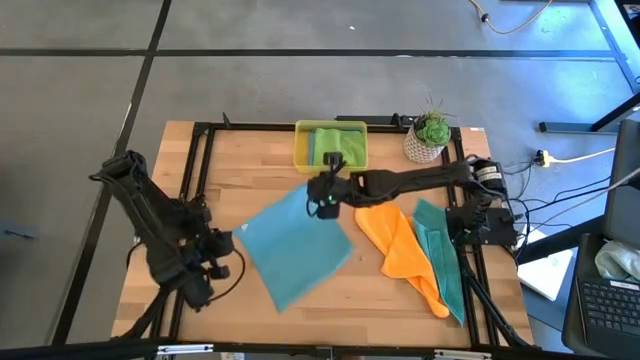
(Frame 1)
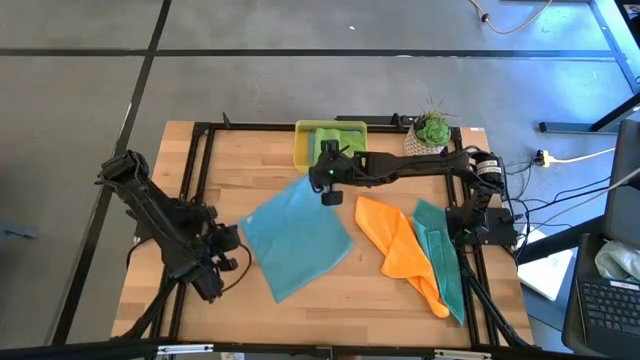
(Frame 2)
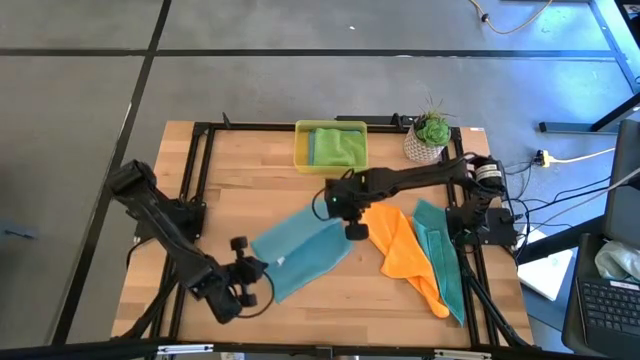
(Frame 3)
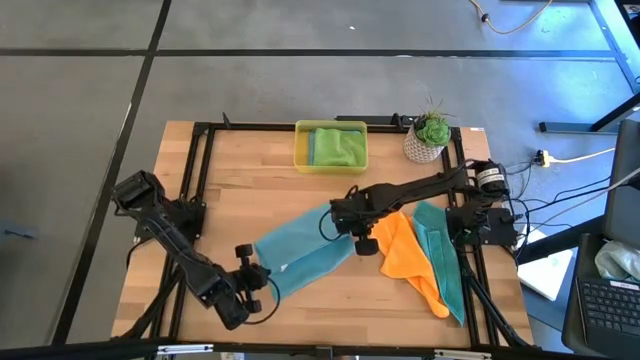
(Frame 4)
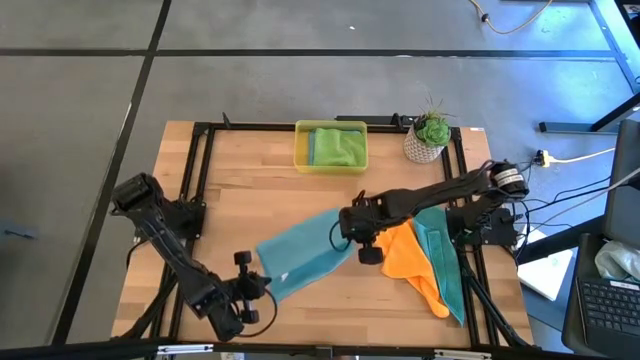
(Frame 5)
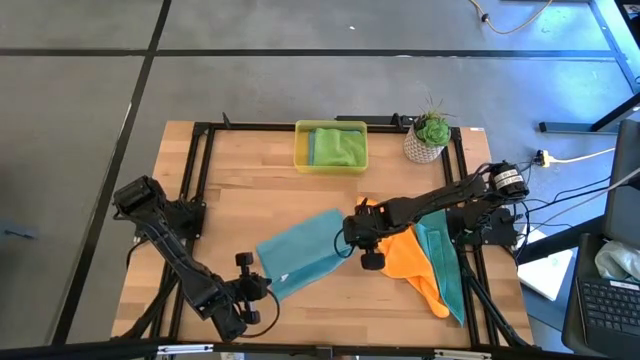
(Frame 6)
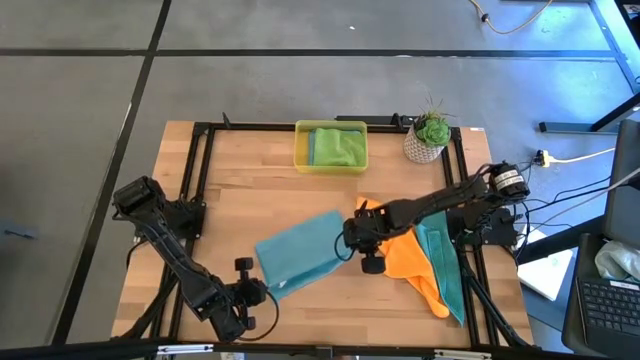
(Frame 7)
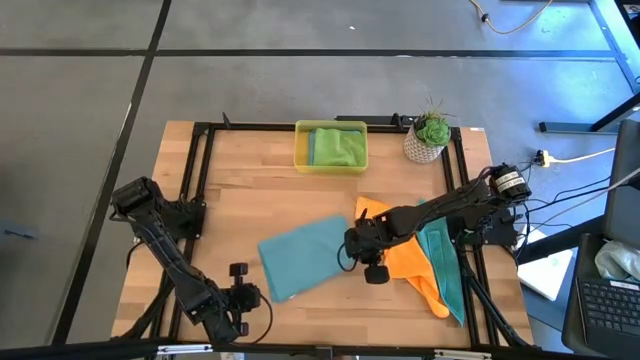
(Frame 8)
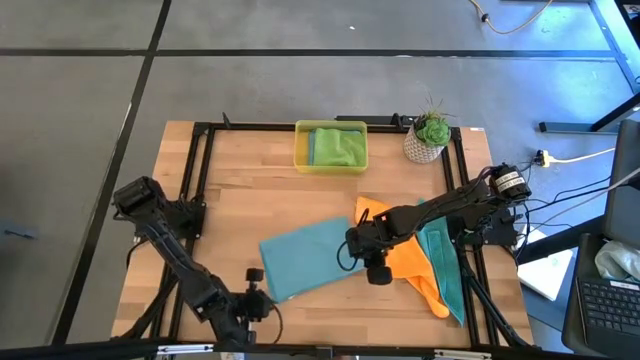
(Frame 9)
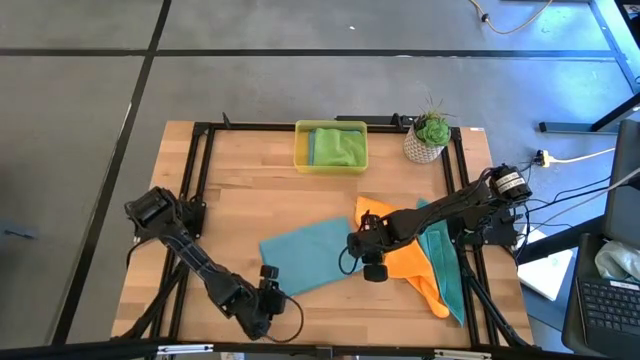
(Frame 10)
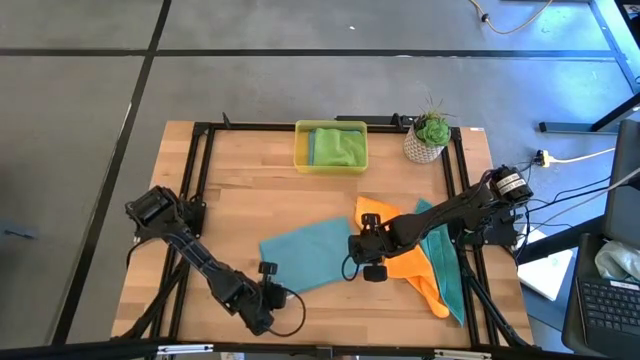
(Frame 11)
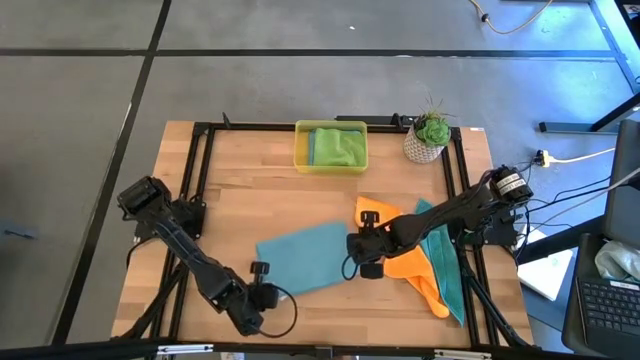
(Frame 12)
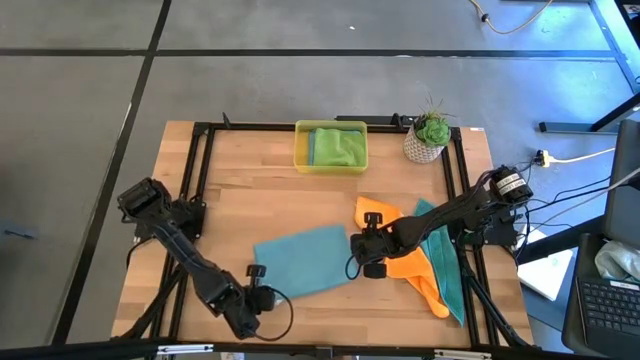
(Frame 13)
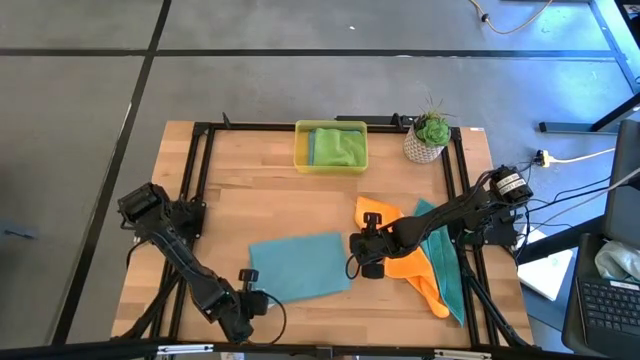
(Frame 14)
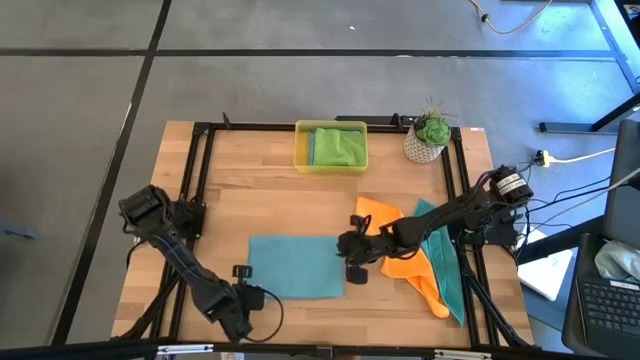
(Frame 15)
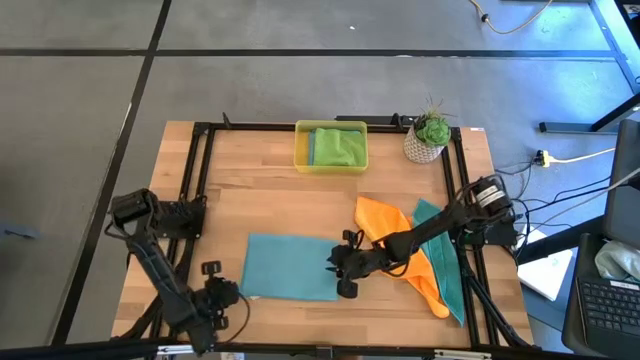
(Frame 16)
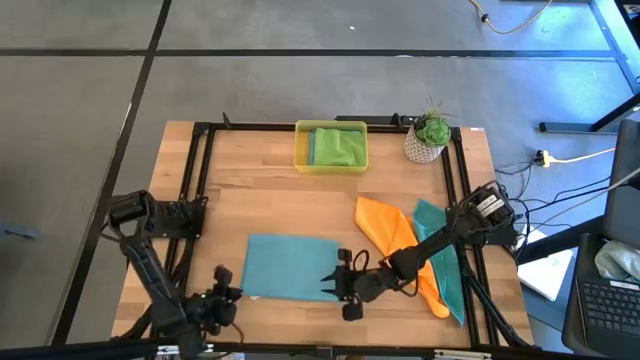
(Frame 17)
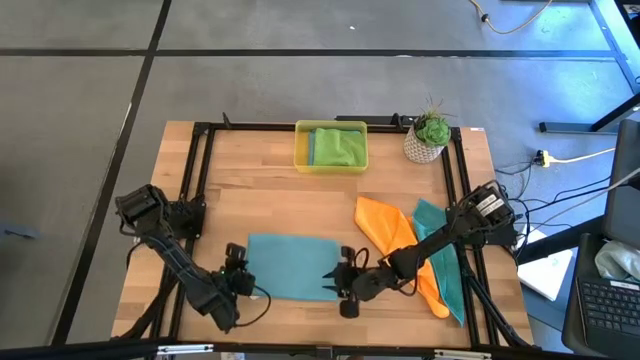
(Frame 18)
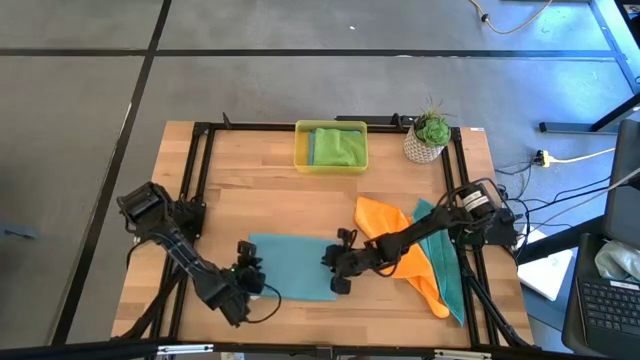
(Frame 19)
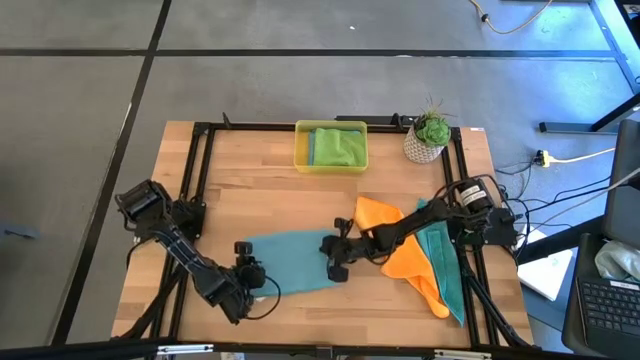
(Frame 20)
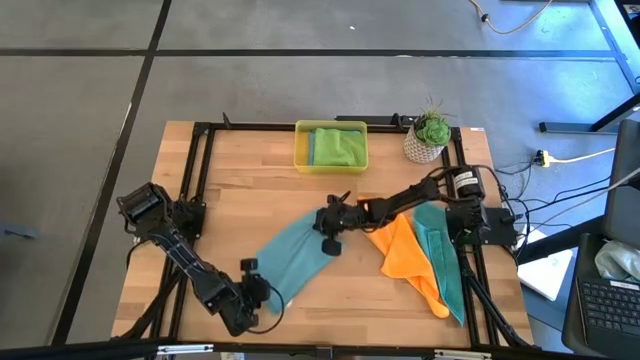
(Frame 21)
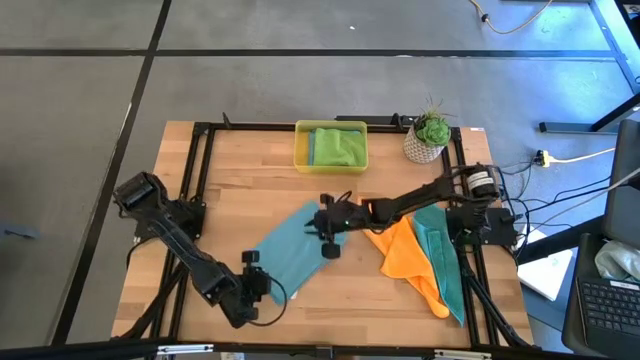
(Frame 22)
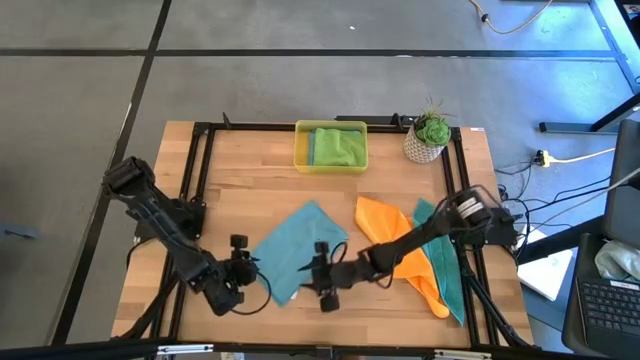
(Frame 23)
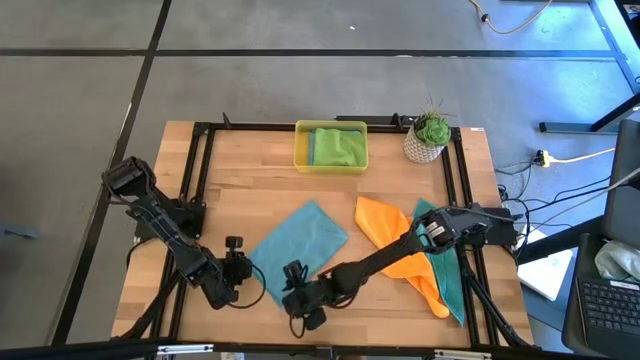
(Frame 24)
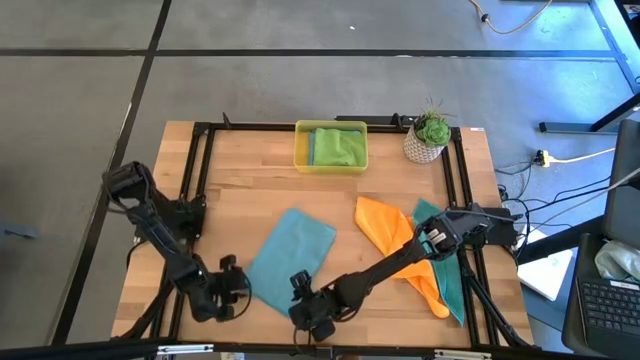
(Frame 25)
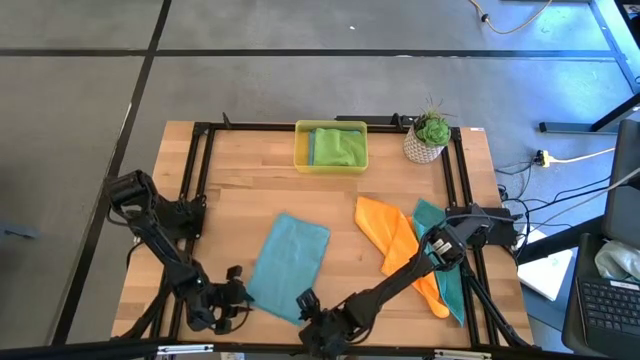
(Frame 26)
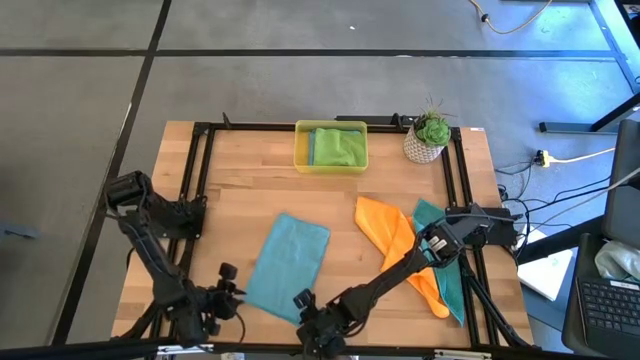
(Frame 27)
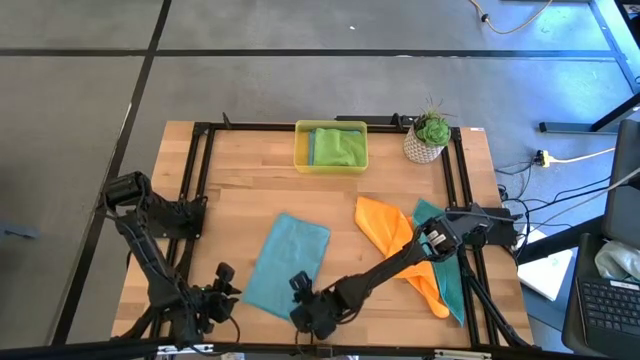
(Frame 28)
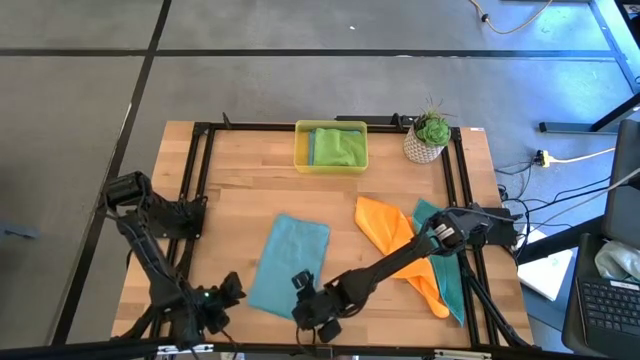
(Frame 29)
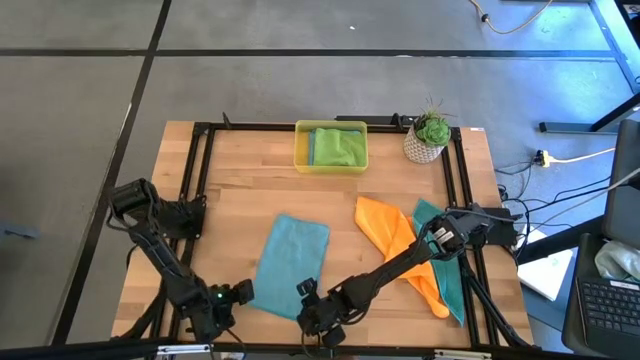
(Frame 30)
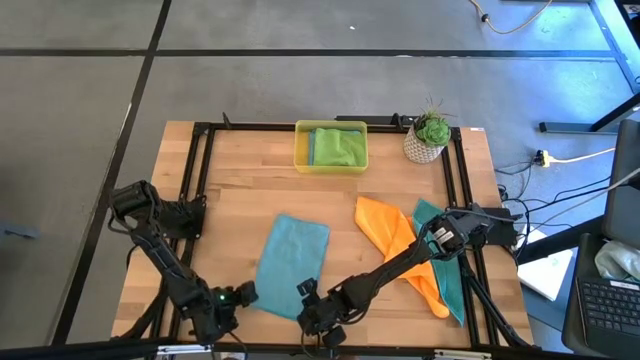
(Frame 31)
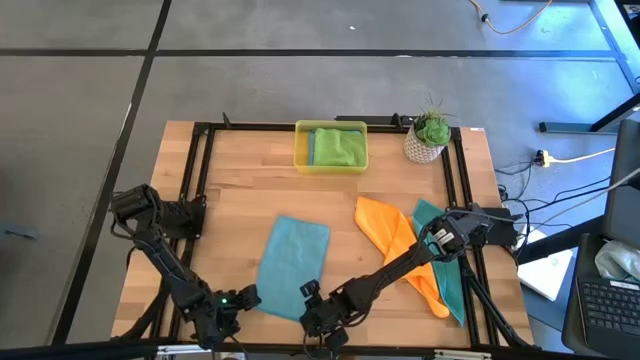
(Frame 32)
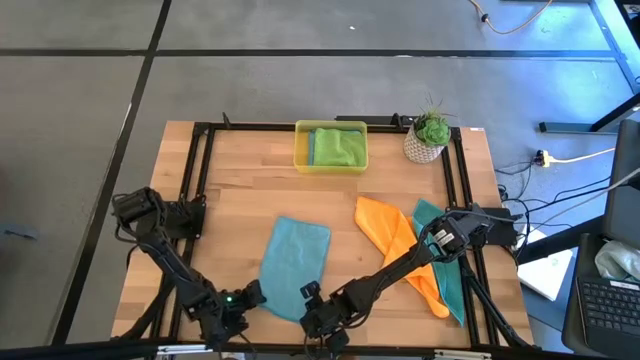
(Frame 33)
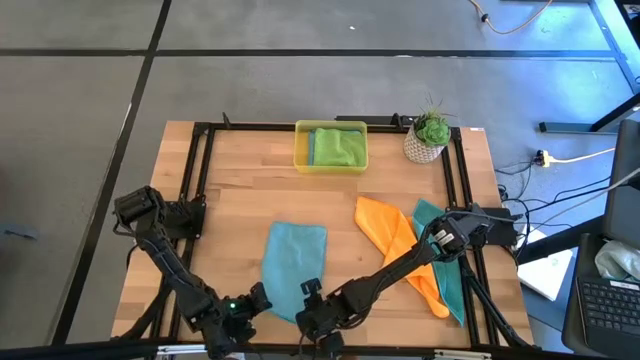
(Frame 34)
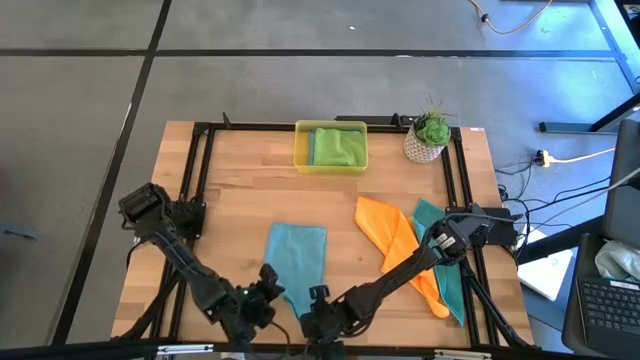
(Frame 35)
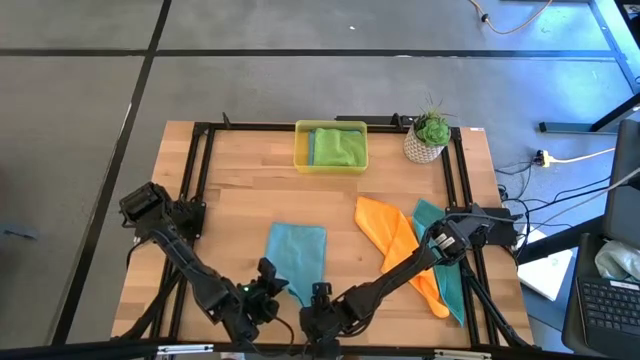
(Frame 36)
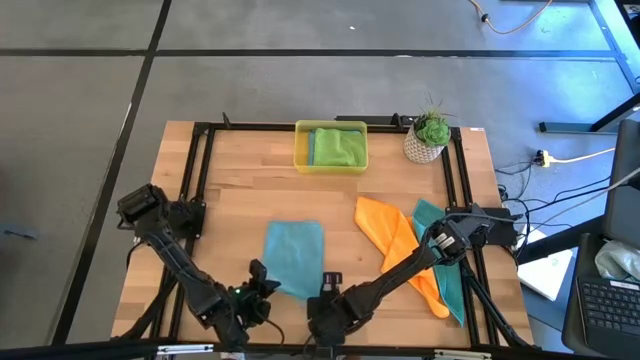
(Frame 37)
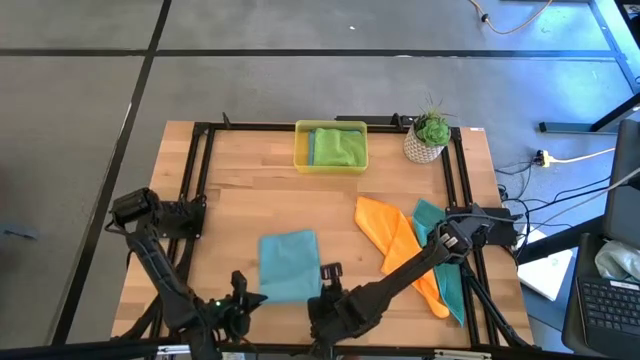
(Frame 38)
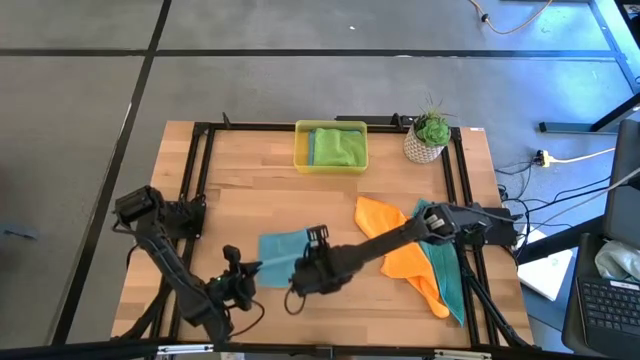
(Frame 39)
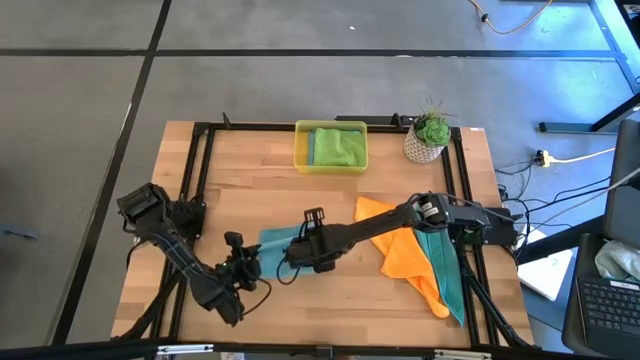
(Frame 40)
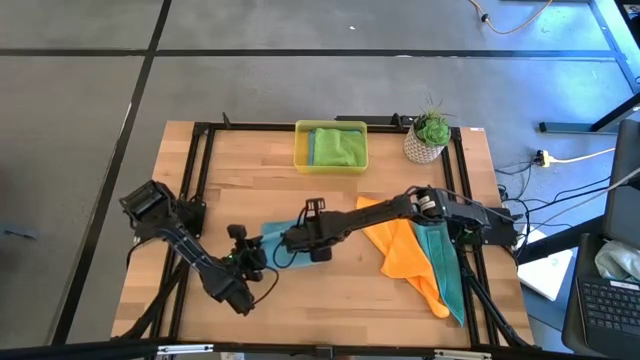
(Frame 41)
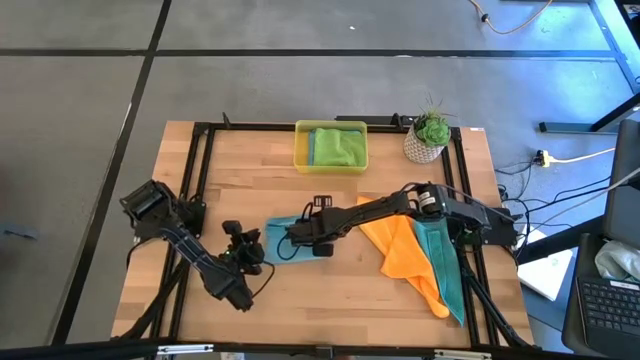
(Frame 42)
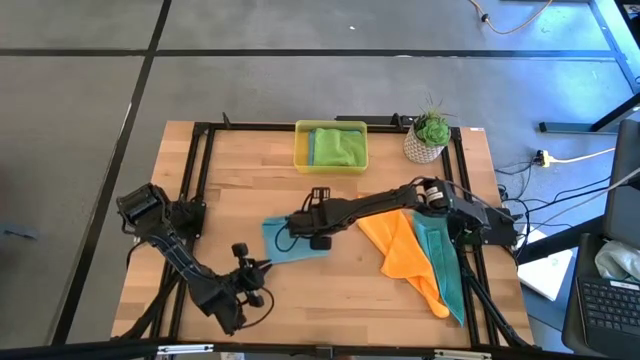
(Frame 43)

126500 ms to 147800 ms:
Task: Fold microfiber towels
Fold the left blue cloth
